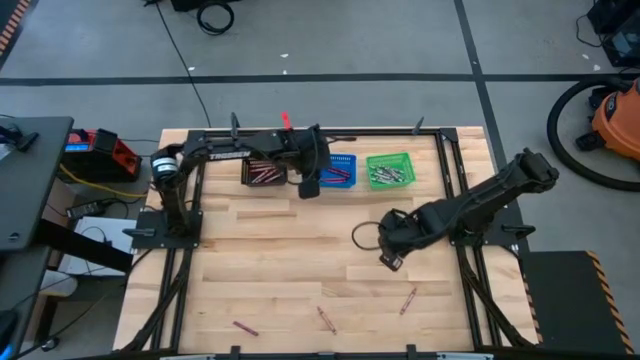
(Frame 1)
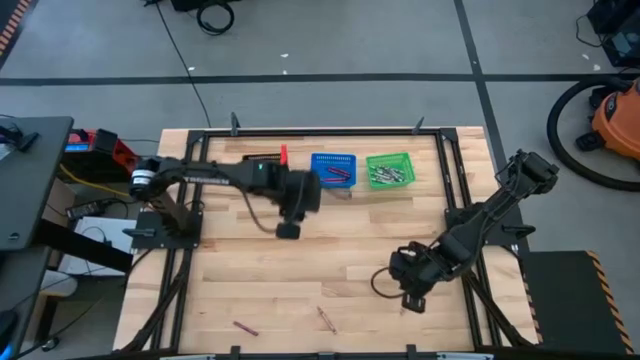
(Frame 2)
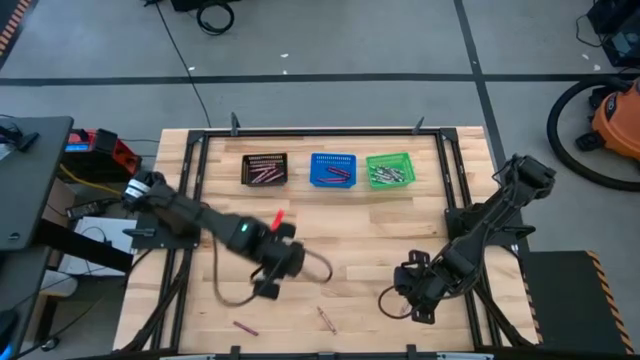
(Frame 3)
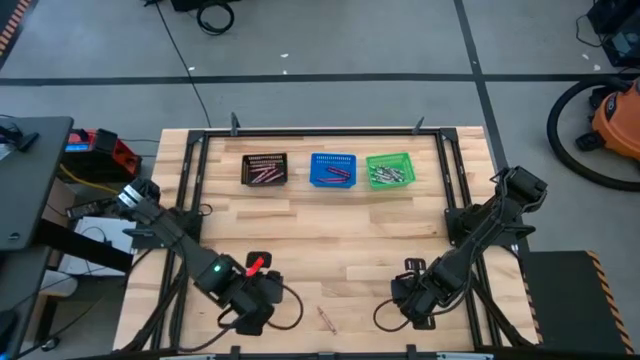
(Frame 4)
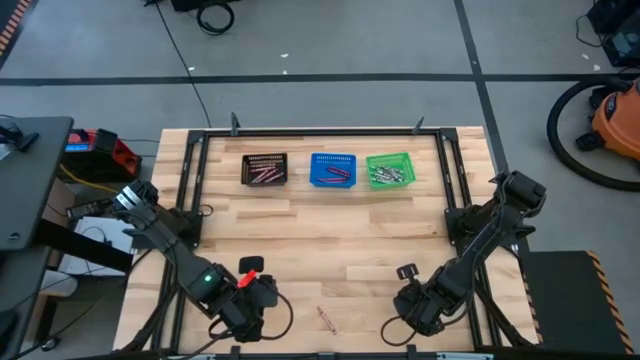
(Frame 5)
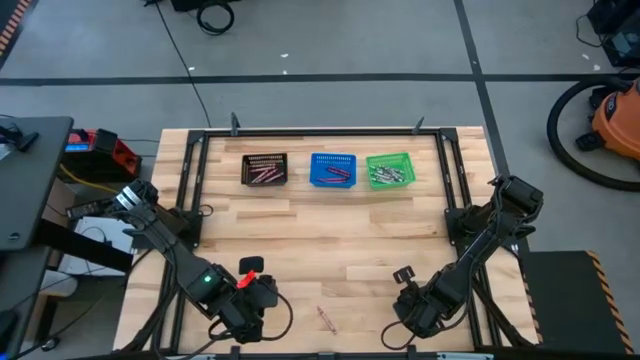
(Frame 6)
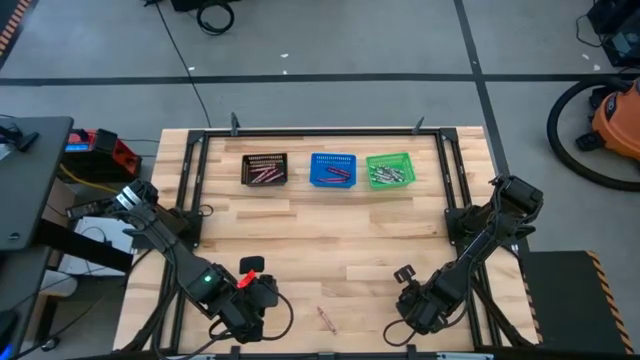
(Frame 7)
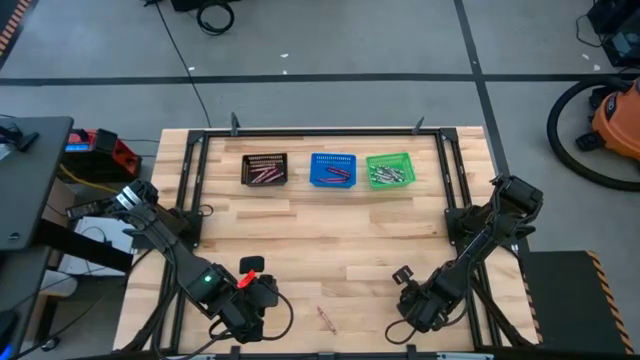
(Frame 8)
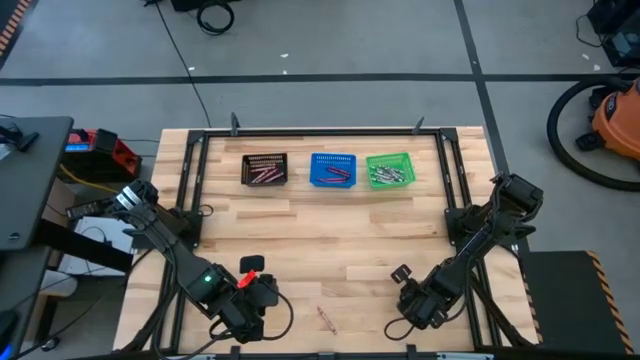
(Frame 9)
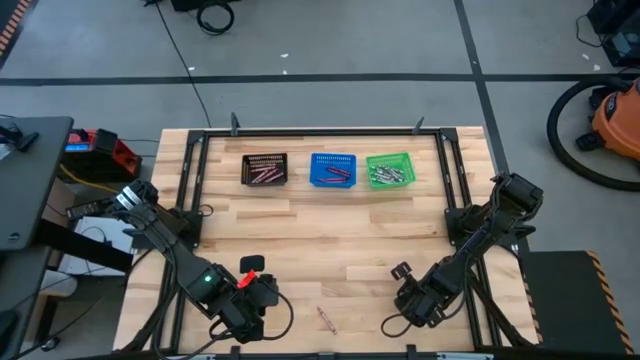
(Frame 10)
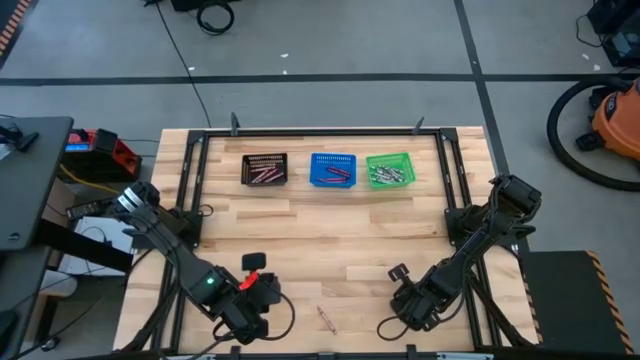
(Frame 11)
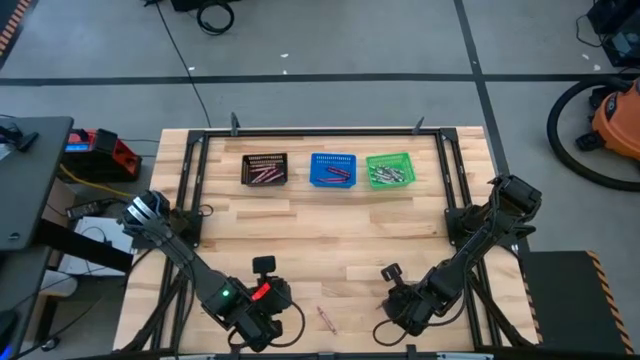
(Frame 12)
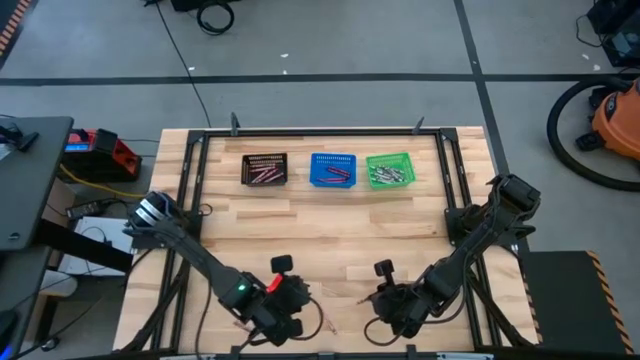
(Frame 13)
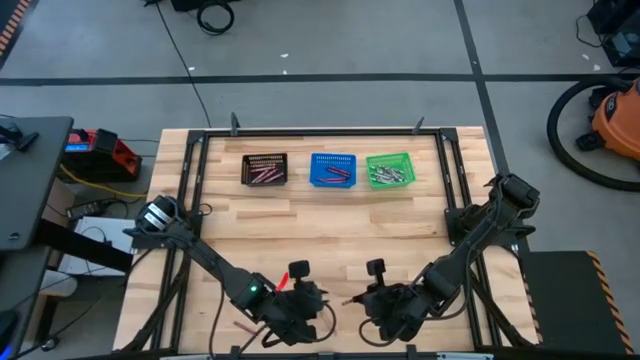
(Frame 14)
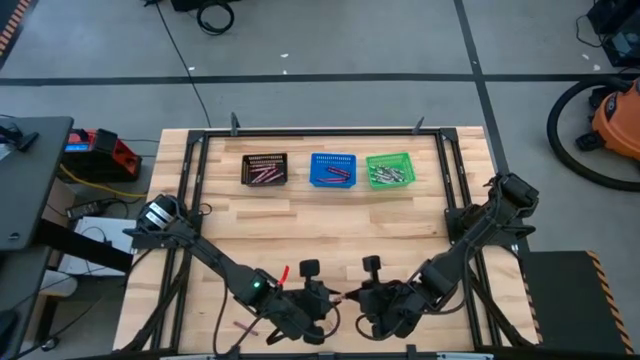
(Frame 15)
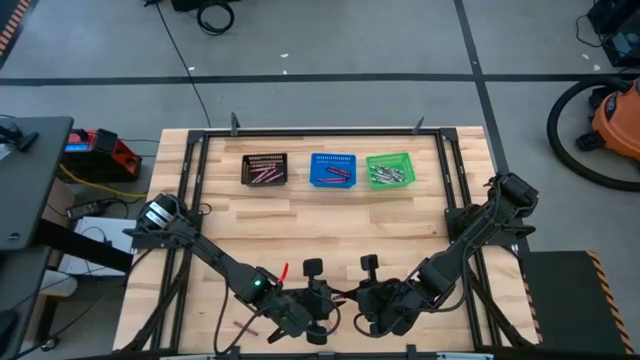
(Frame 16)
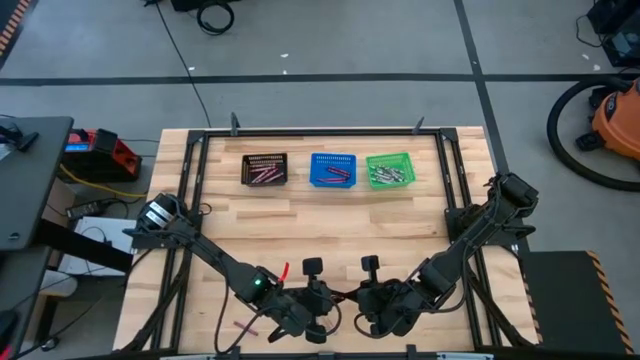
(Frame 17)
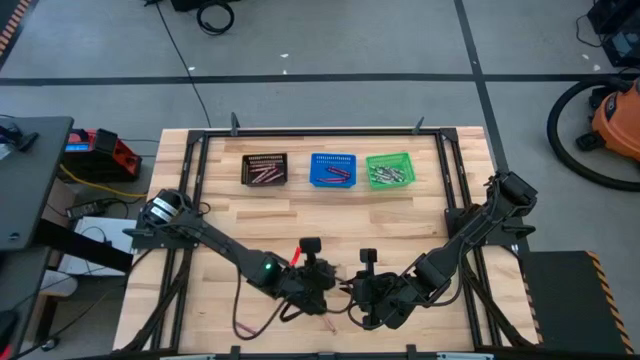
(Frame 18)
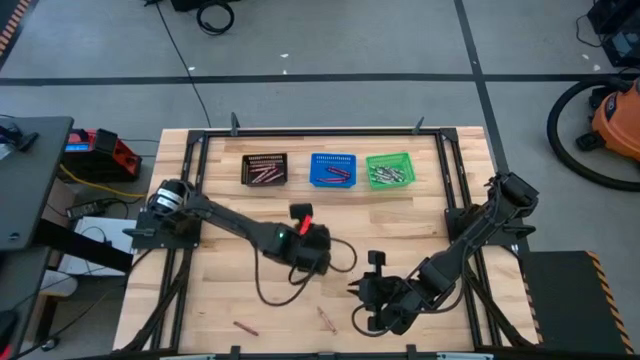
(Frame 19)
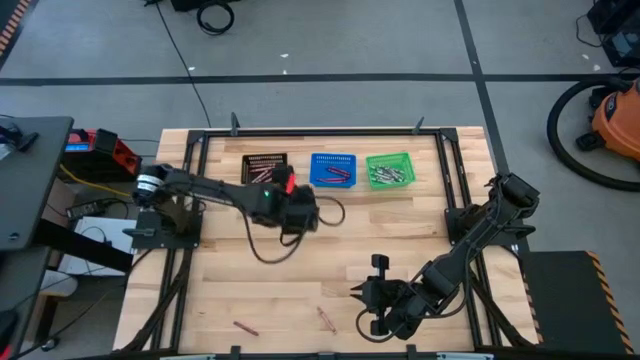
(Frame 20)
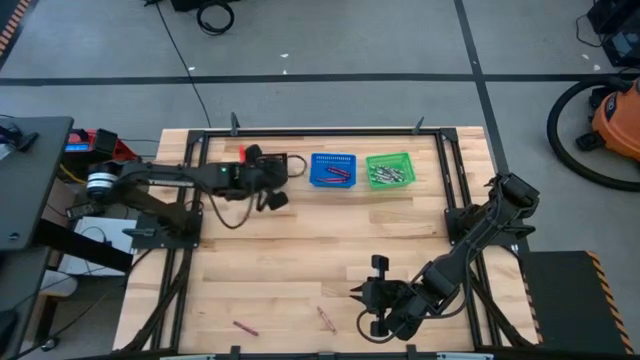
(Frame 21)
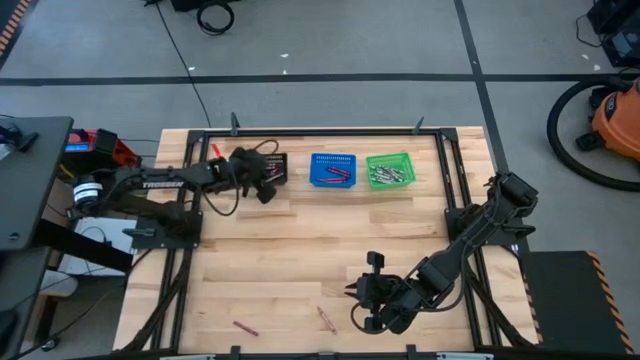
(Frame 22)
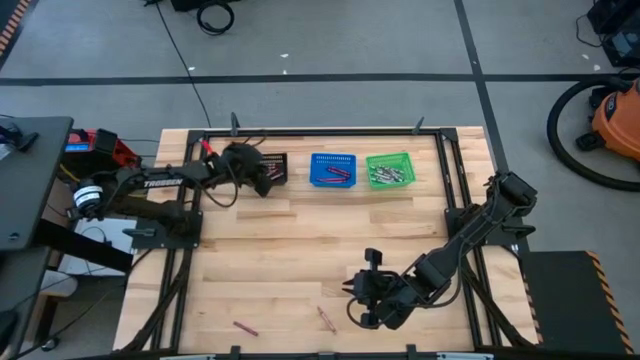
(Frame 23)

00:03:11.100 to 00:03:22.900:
Task: Sort crayons
Put the pink crayon into the black bin

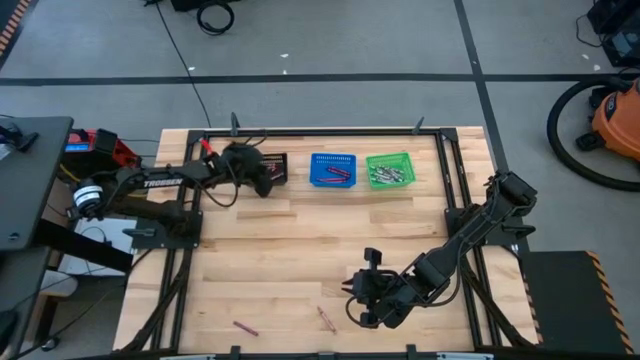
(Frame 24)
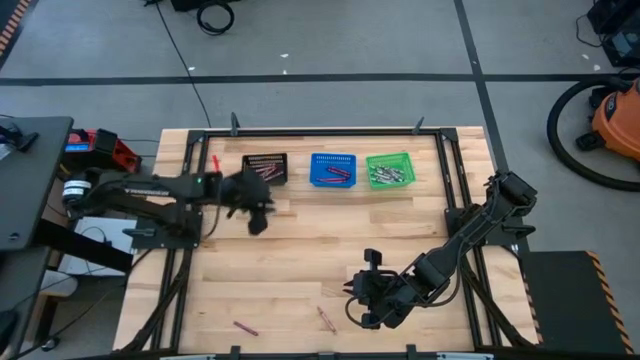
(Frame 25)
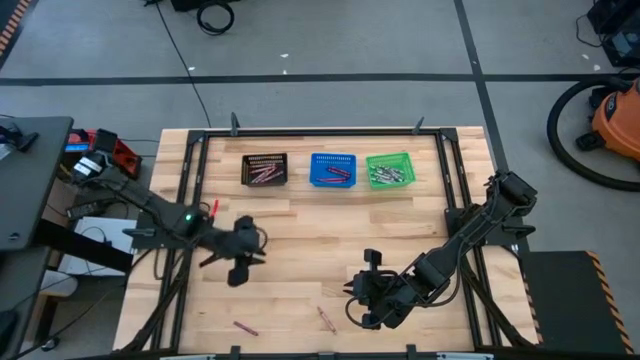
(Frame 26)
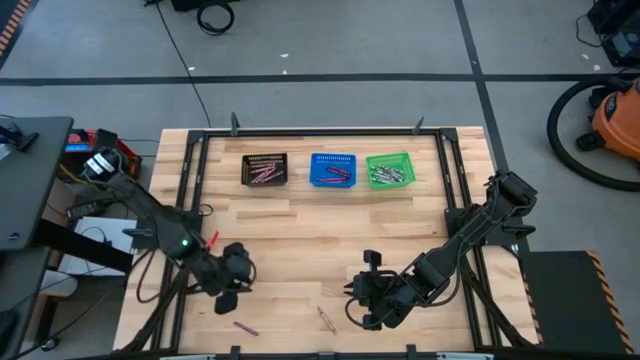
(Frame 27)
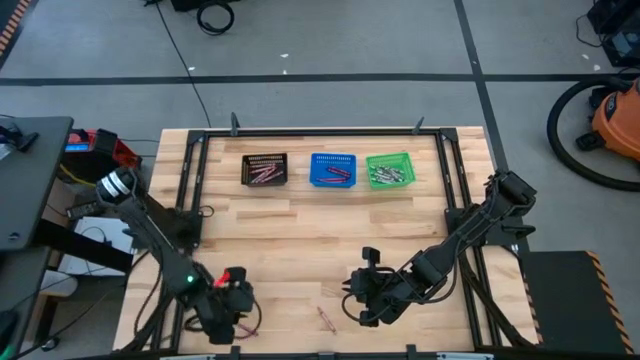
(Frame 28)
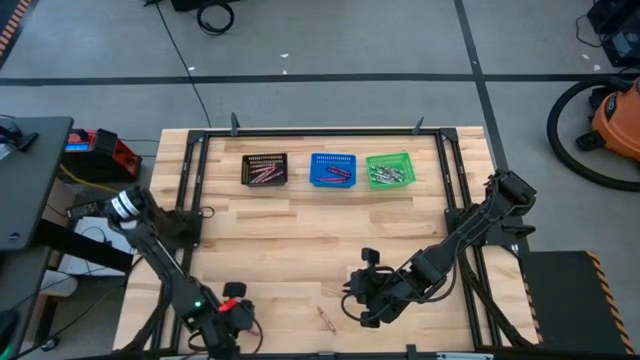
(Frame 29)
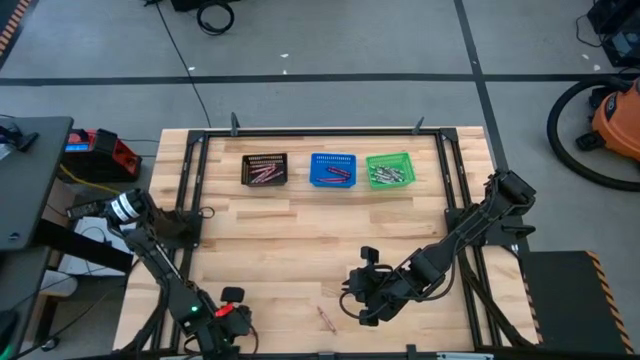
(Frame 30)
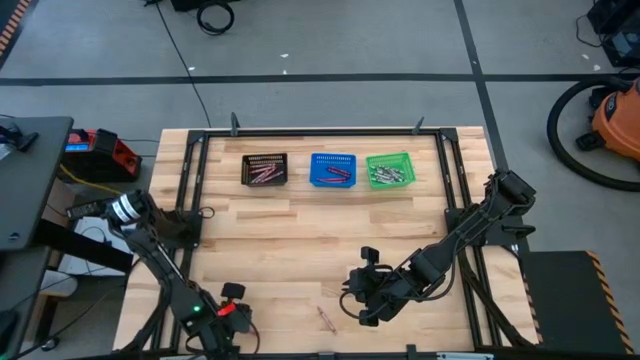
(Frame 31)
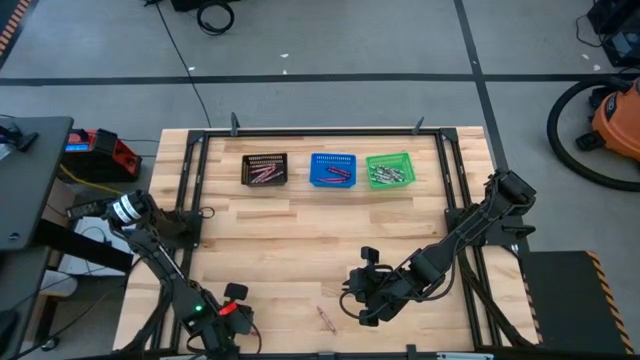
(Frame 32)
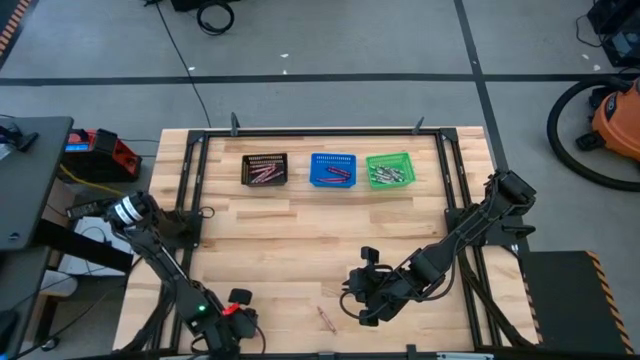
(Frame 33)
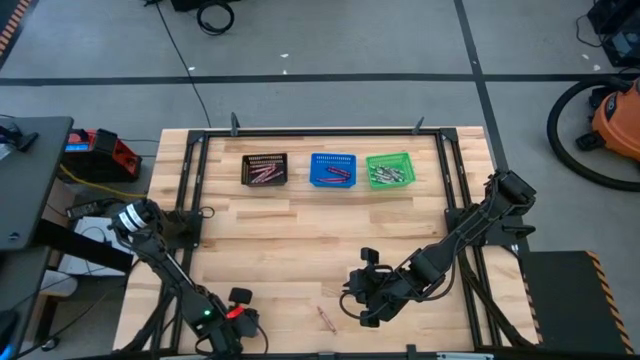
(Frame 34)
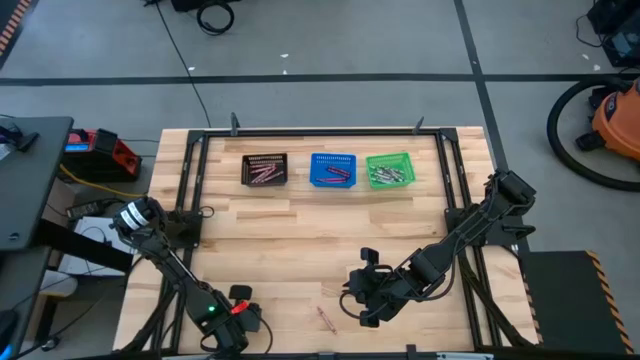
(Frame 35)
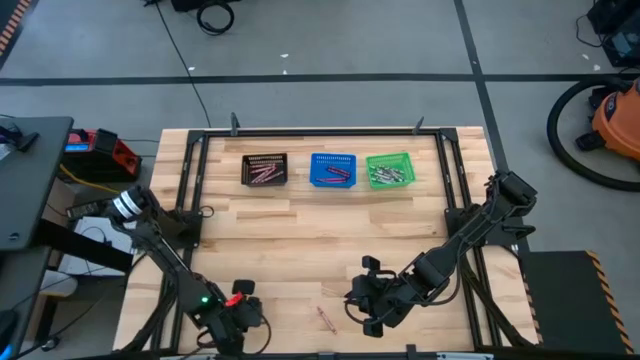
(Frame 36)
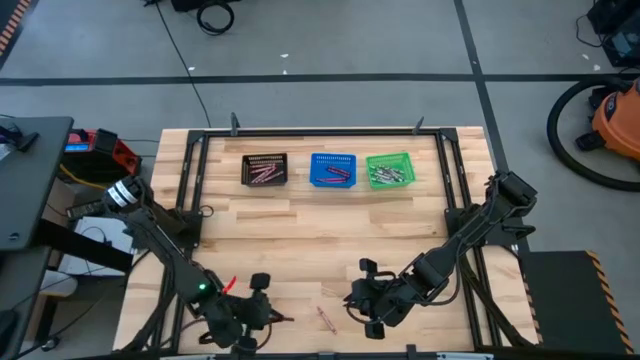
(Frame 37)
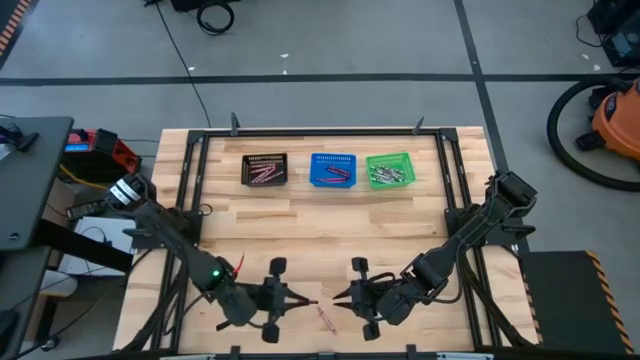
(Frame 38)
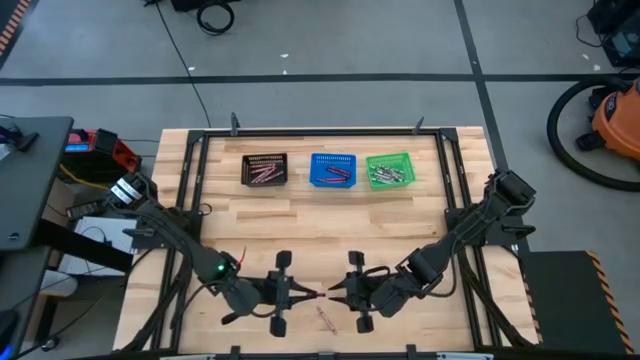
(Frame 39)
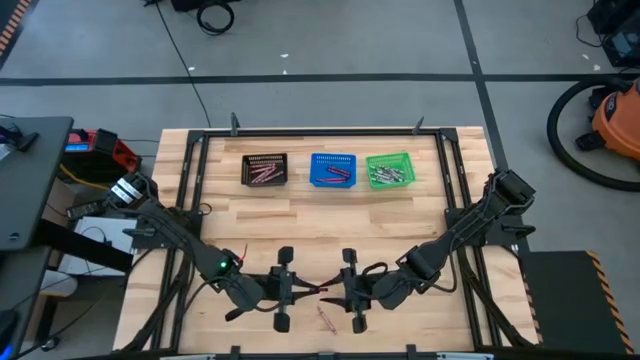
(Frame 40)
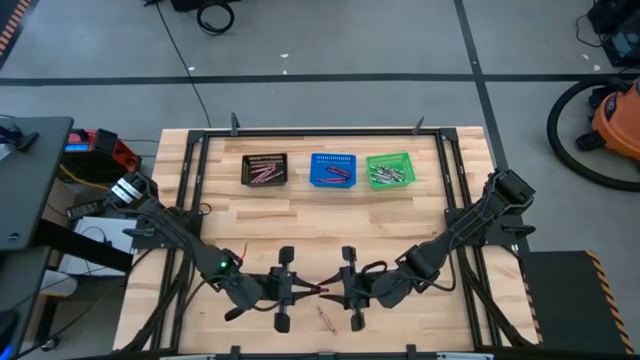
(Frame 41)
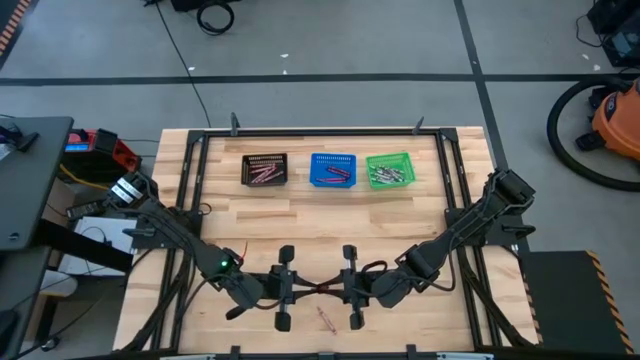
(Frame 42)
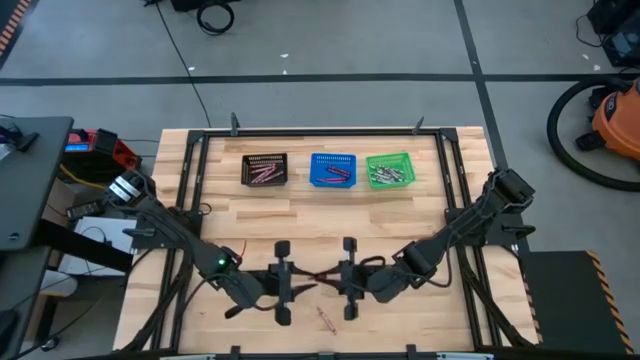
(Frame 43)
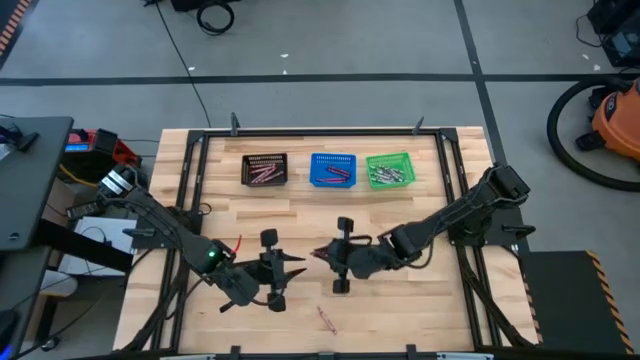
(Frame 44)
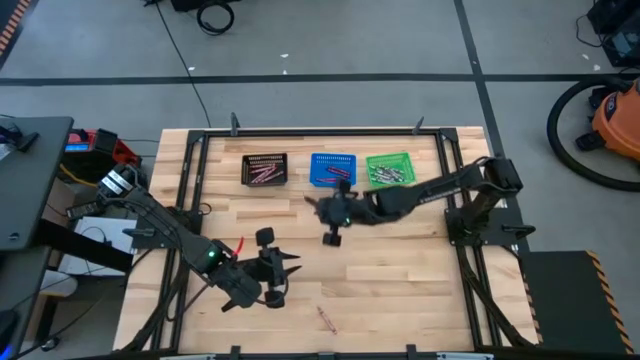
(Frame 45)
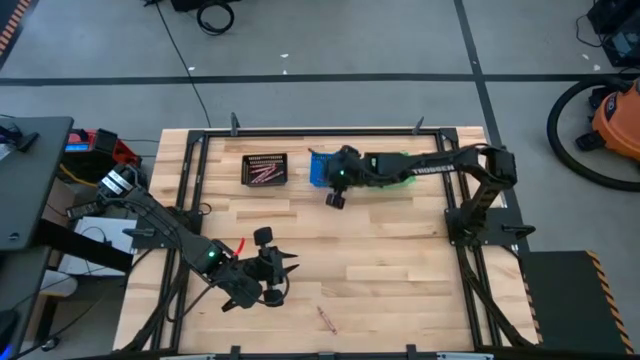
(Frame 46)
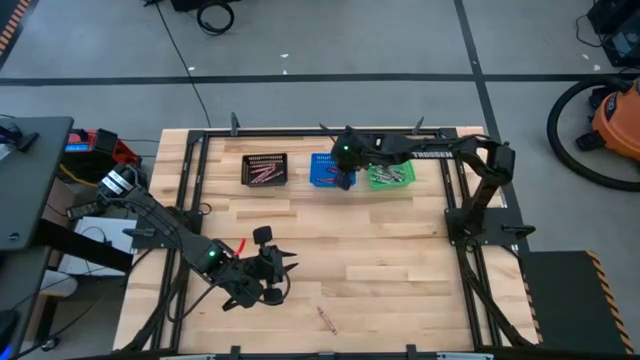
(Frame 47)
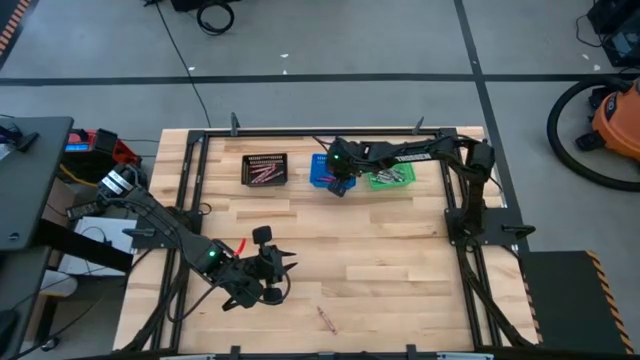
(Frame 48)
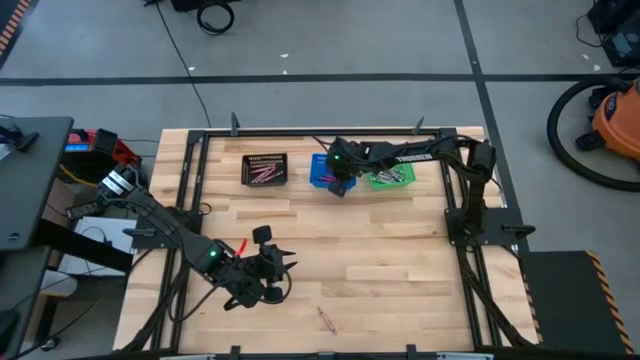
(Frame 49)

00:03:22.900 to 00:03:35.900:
Put the red crayon into the blue bin
